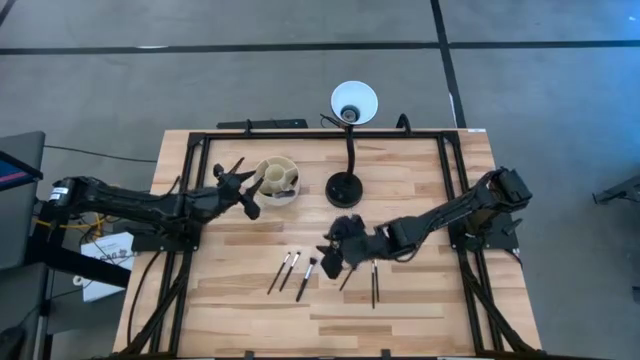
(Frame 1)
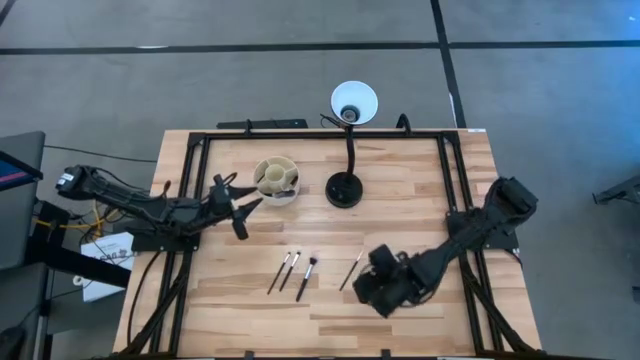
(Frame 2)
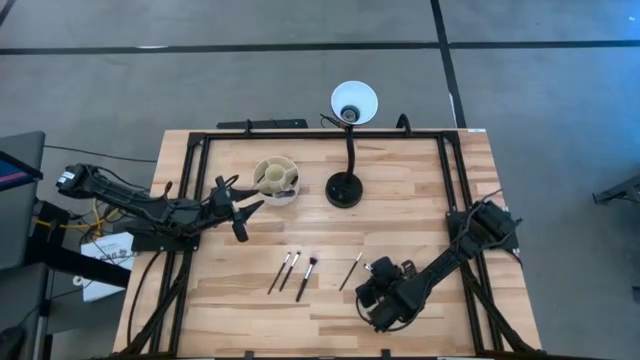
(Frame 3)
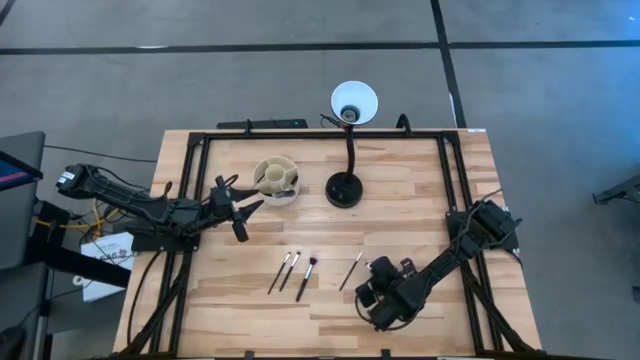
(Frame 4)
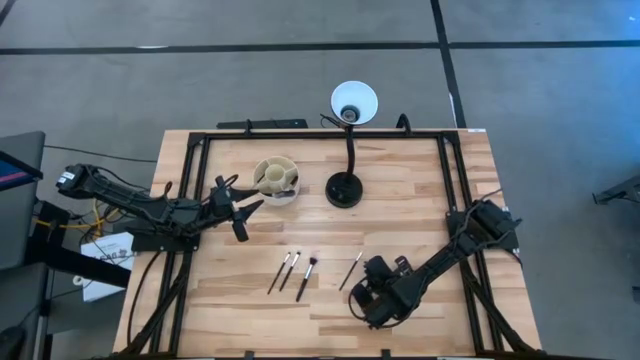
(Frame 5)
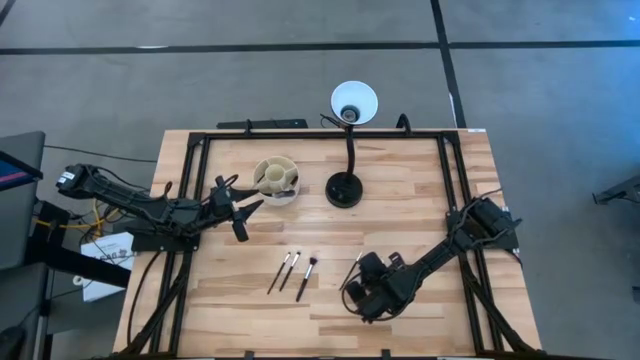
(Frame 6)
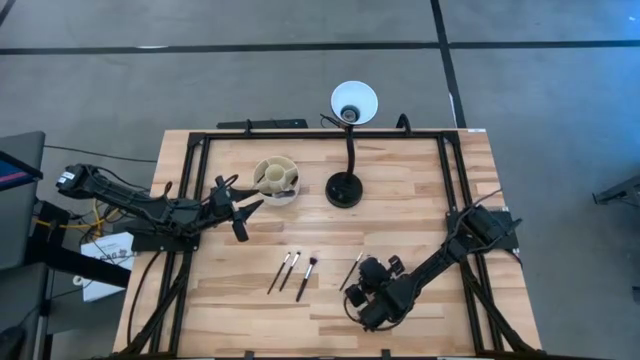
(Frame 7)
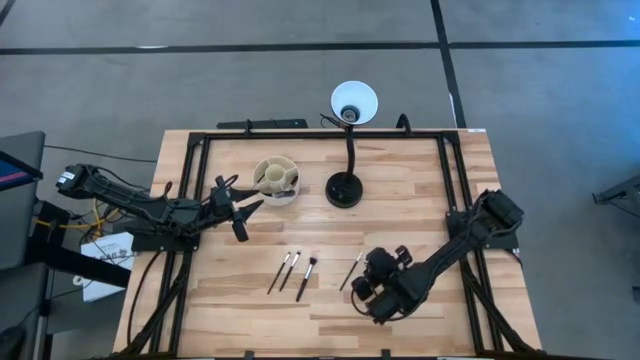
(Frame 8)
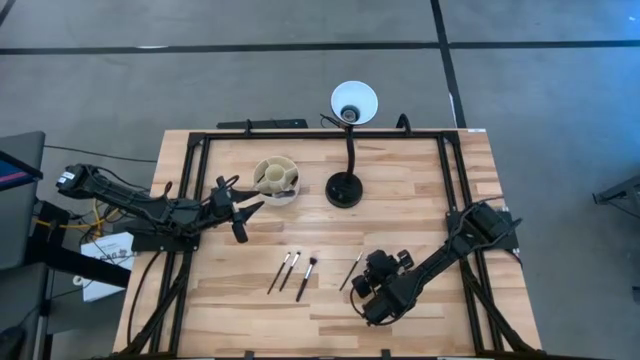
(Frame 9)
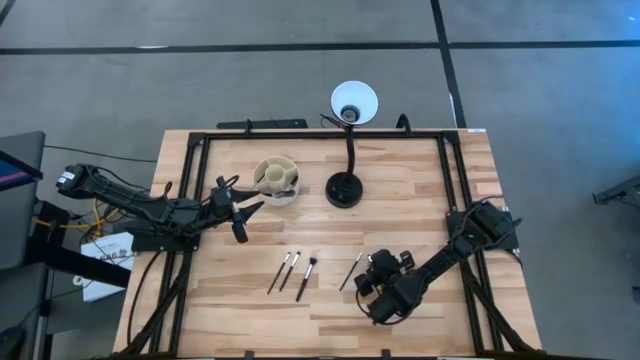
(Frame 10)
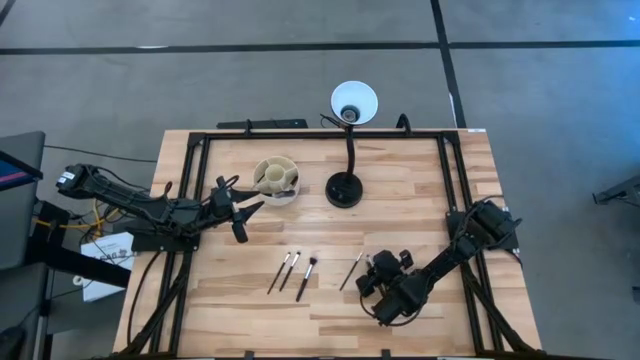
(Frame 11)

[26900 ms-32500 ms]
Task: Put items in baskets/containers
Put the eyeshadow brush into the organizer

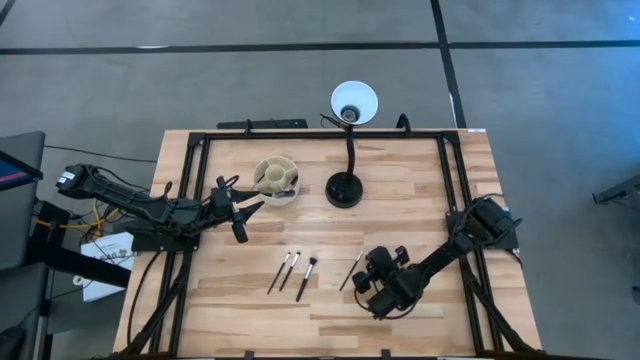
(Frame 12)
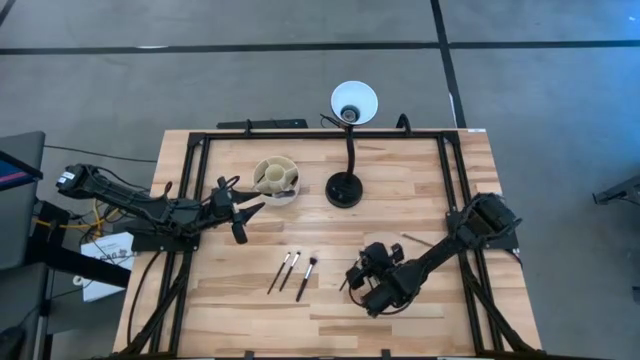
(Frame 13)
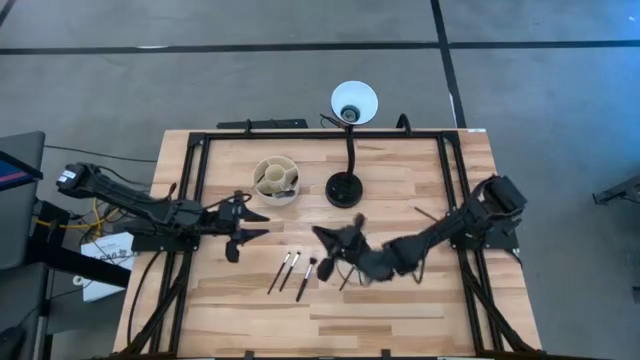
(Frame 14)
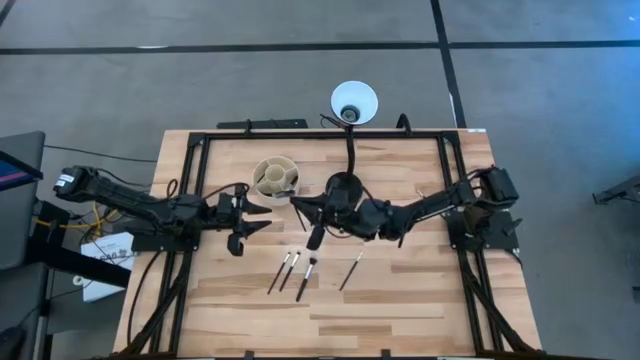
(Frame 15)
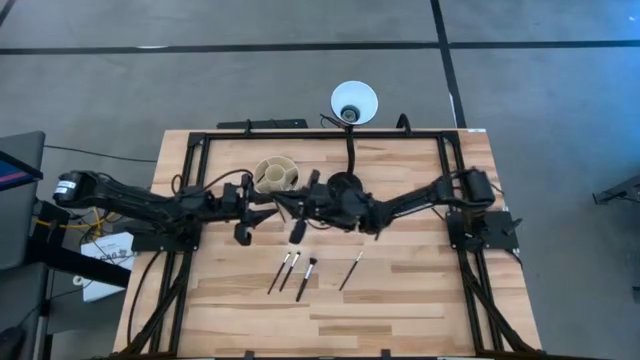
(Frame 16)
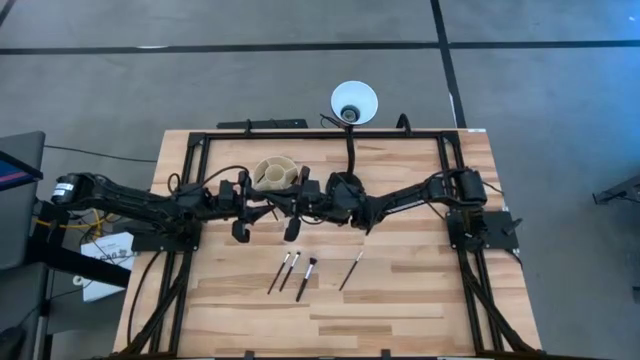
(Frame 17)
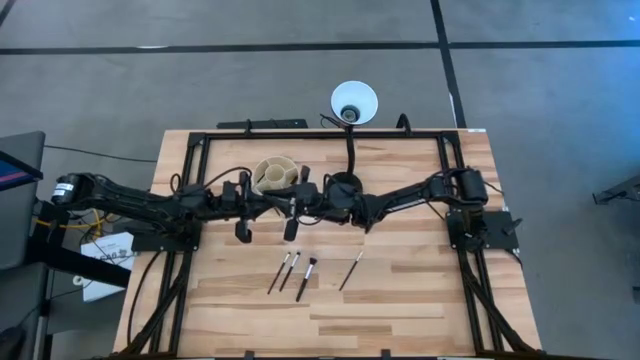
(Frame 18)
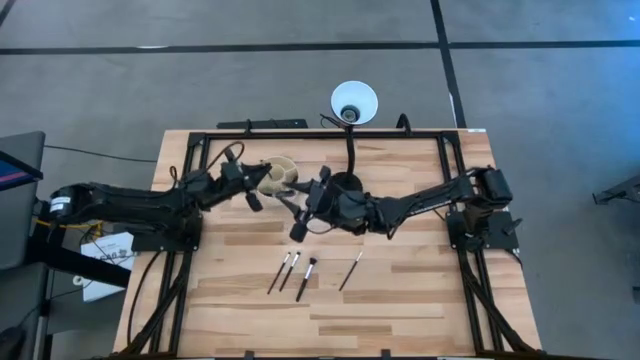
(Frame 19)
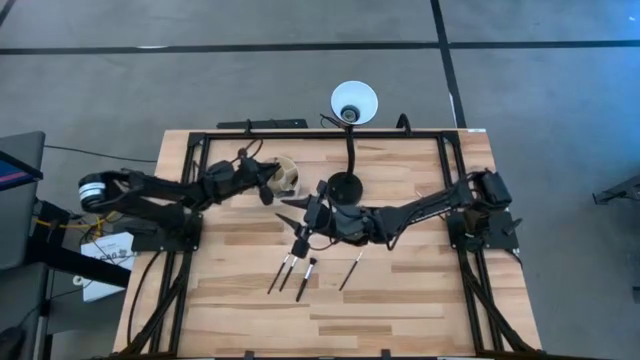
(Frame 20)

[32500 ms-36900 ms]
Put the eyeshadow brush into the organizer

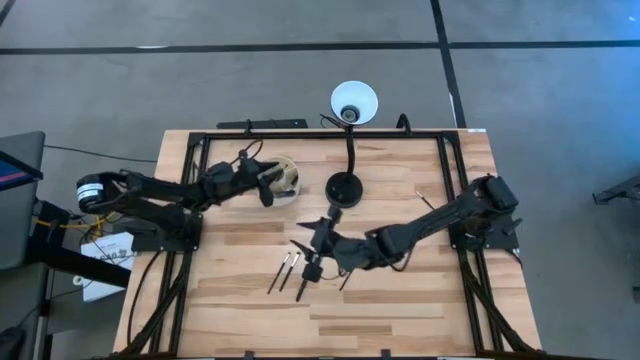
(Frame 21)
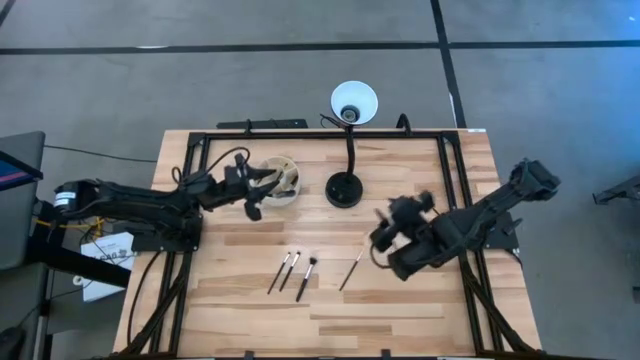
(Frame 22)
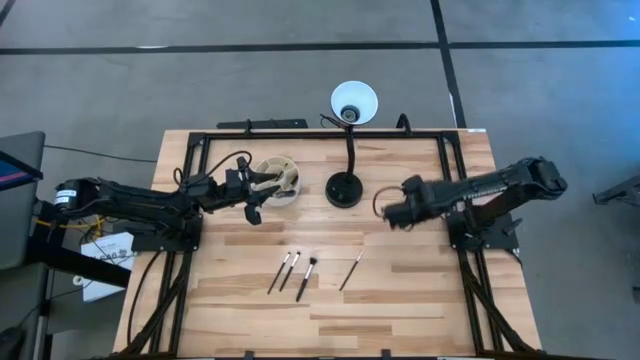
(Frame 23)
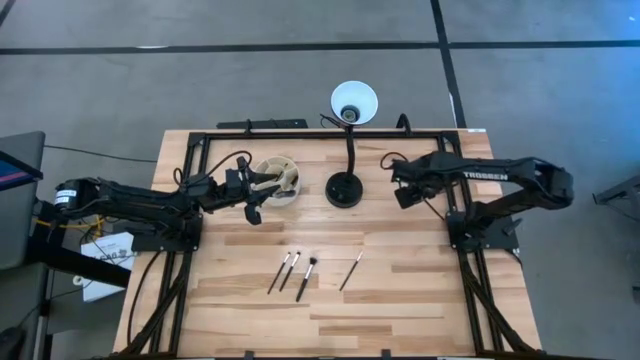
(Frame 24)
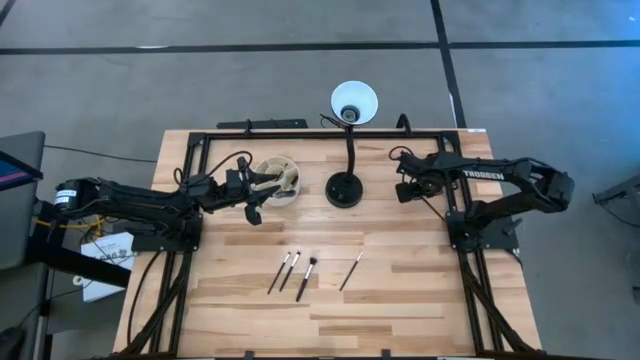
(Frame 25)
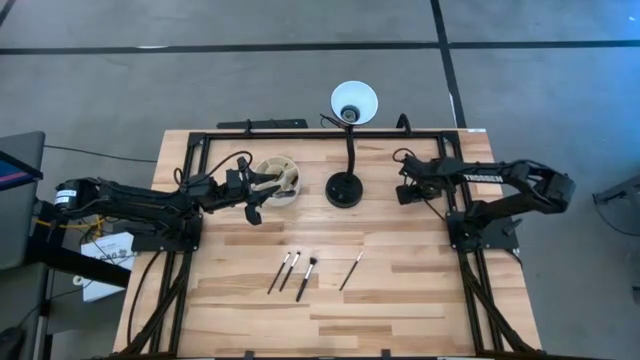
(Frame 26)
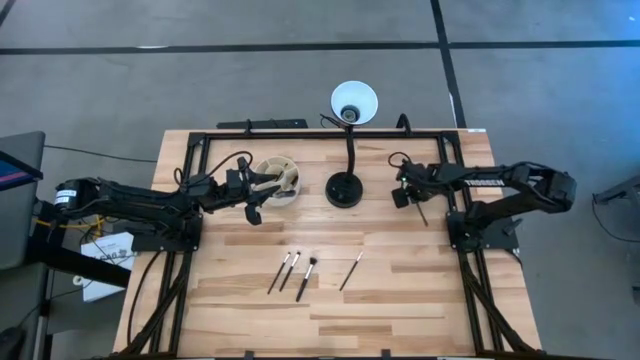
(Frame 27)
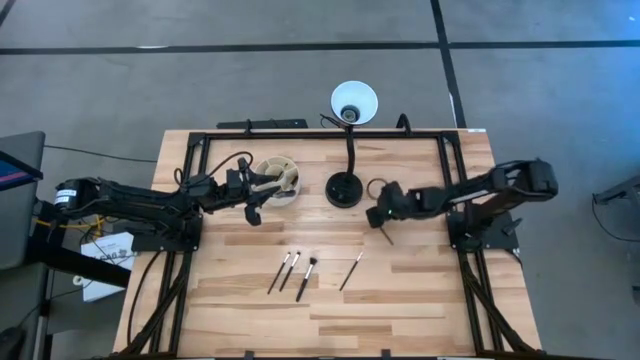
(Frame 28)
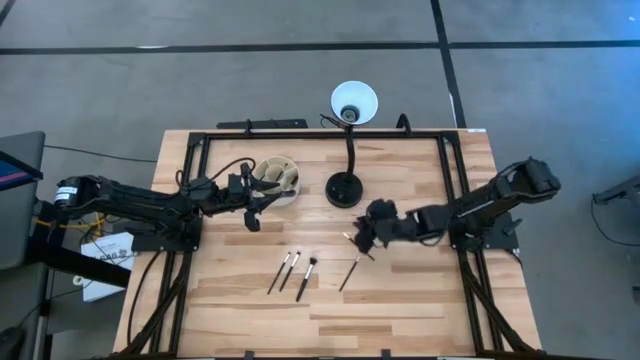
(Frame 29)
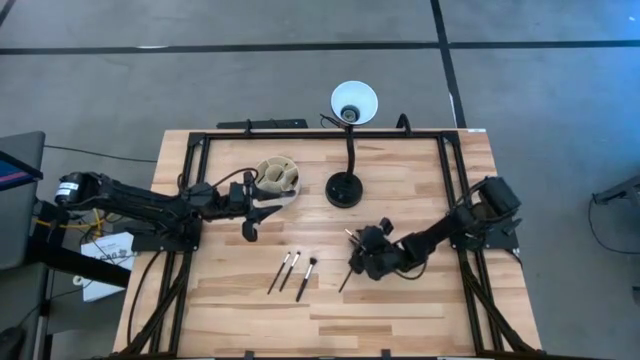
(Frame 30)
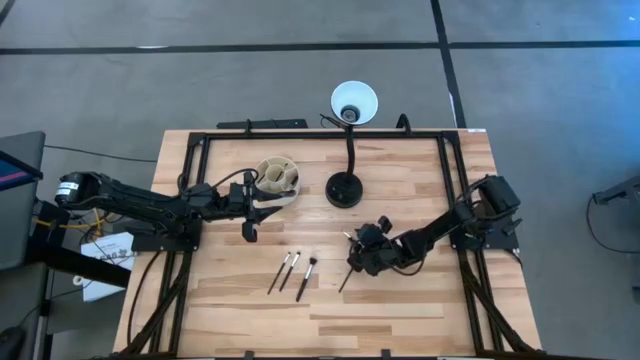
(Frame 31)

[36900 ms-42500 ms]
Put the liner brush into the organizer

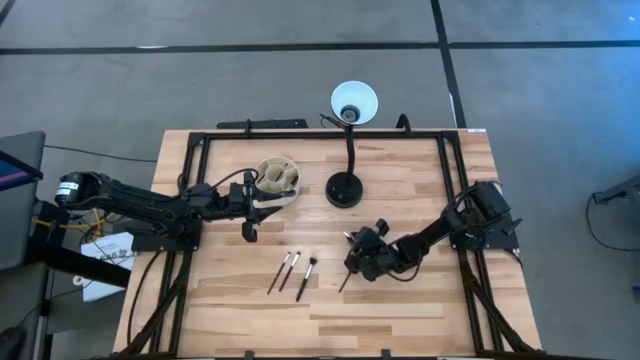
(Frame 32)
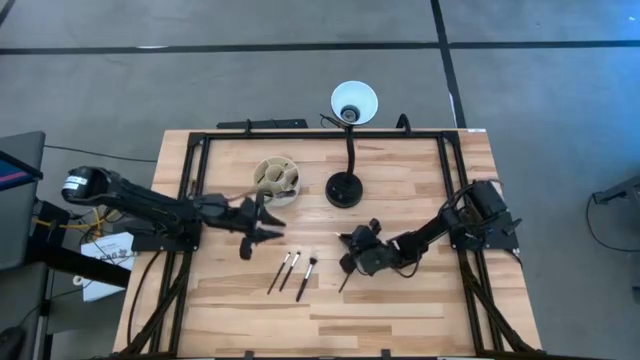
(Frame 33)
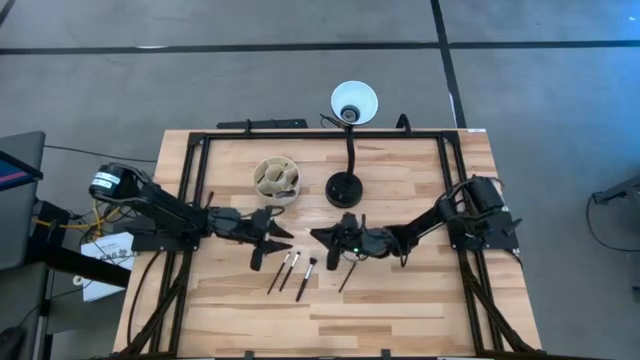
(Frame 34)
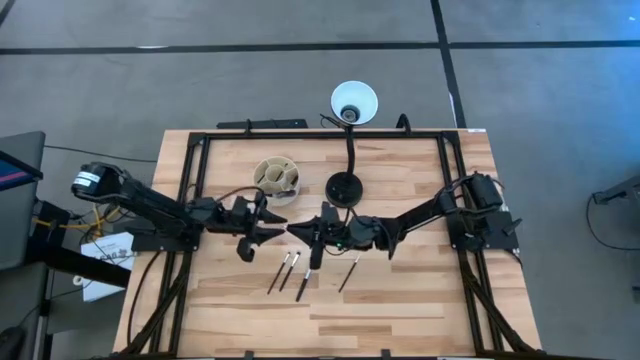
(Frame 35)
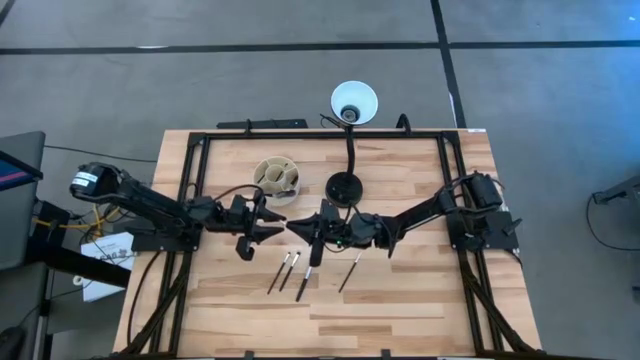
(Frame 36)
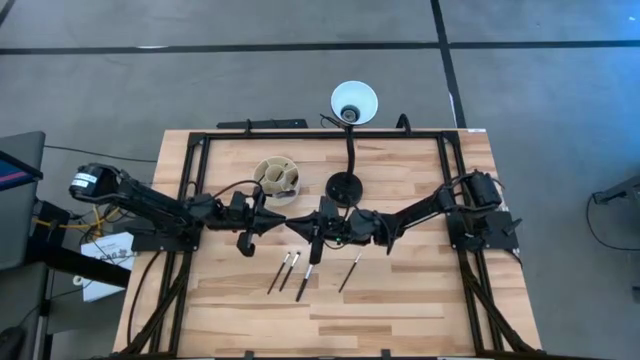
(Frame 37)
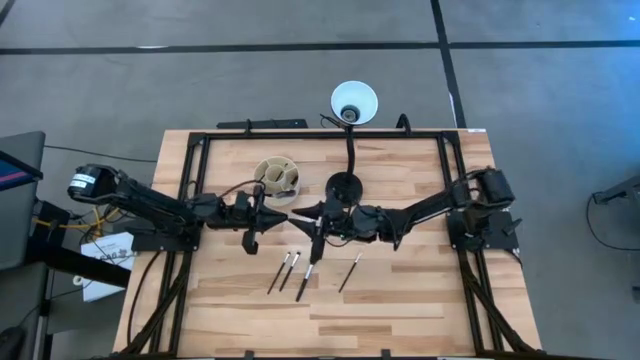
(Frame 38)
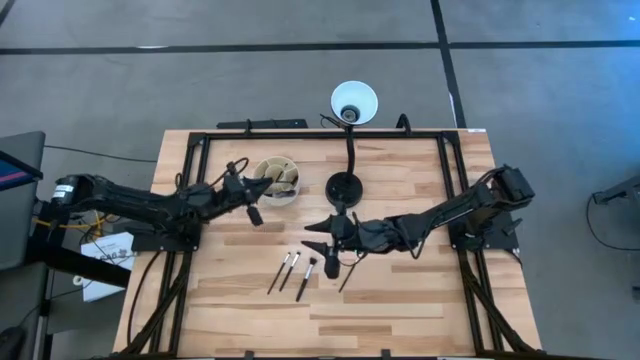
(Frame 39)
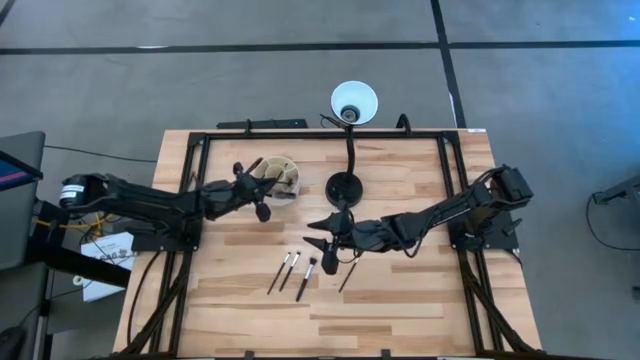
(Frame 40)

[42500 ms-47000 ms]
Put the liner brush into the organizer
